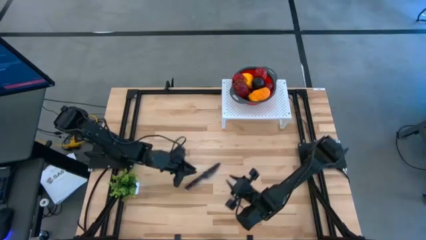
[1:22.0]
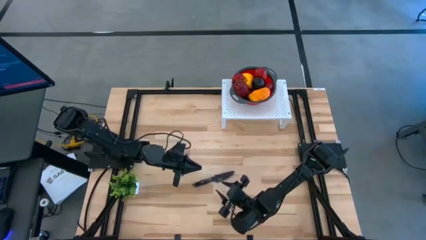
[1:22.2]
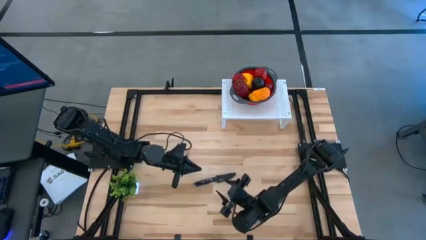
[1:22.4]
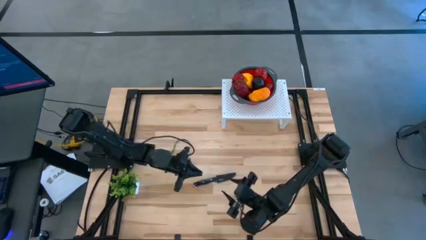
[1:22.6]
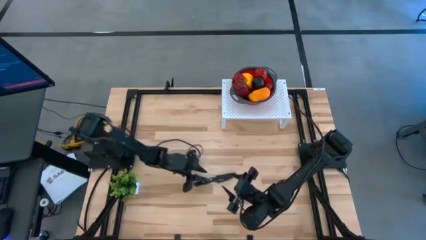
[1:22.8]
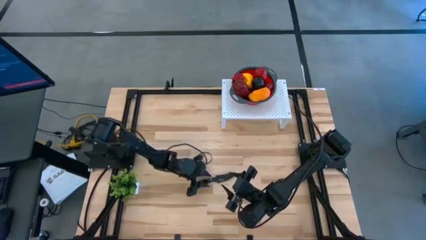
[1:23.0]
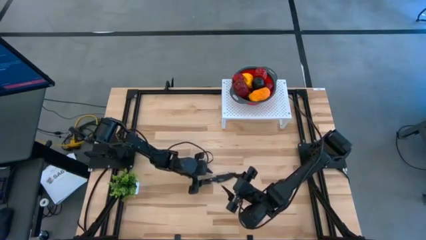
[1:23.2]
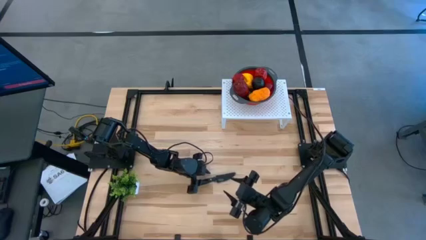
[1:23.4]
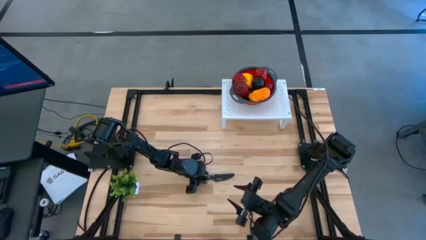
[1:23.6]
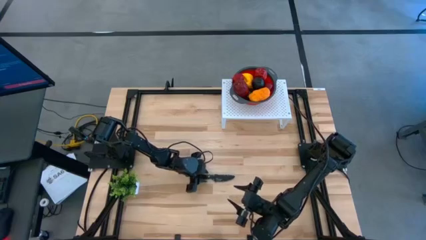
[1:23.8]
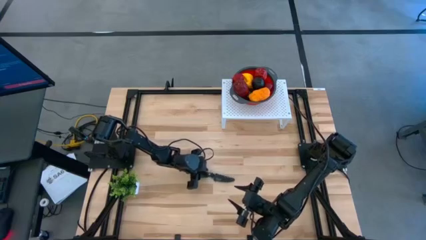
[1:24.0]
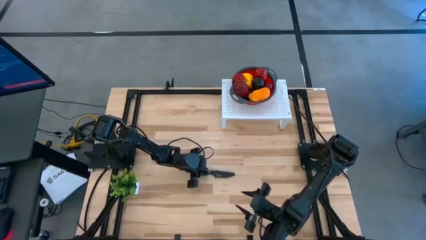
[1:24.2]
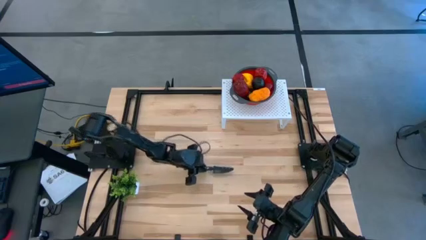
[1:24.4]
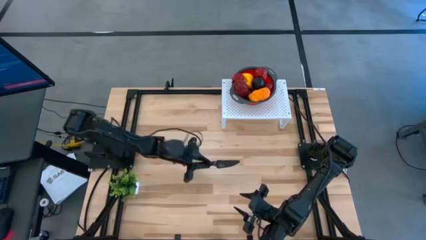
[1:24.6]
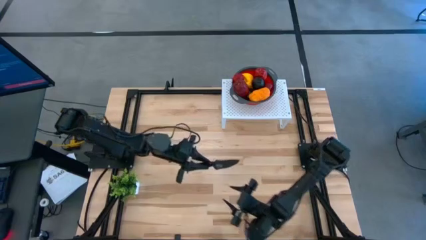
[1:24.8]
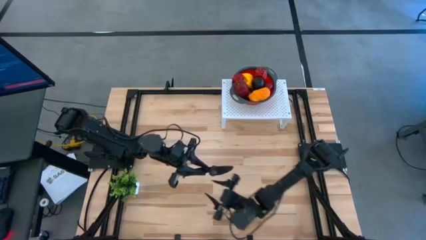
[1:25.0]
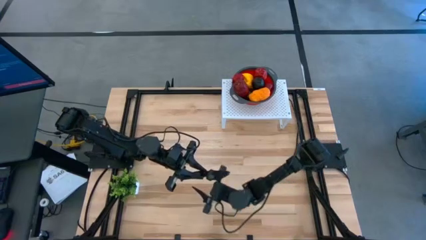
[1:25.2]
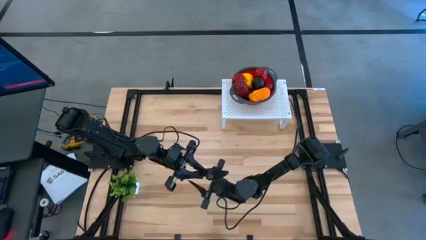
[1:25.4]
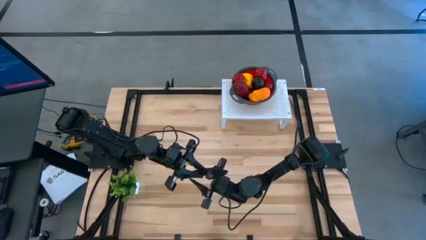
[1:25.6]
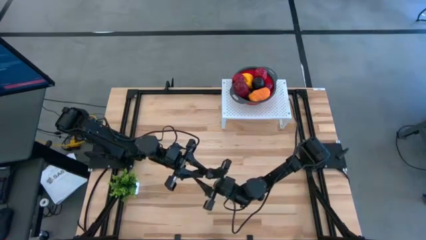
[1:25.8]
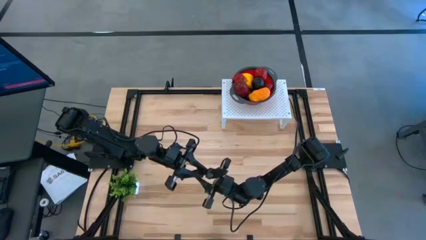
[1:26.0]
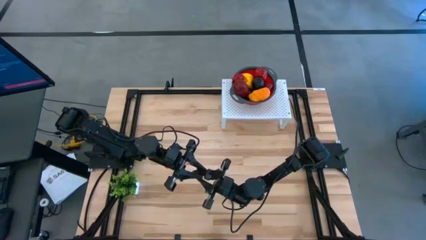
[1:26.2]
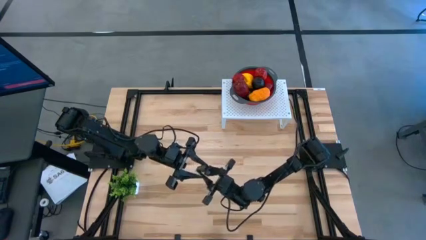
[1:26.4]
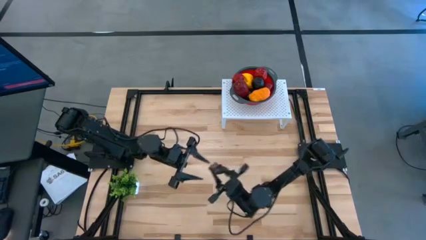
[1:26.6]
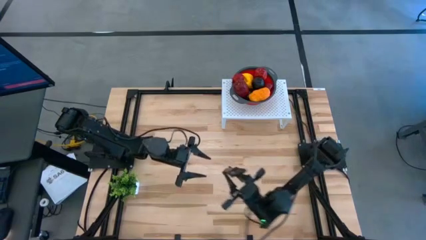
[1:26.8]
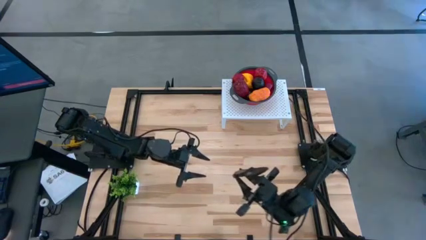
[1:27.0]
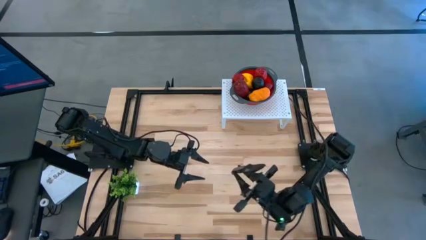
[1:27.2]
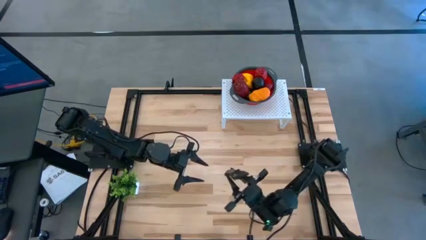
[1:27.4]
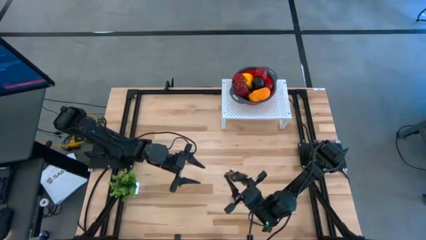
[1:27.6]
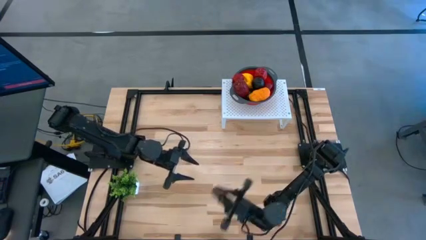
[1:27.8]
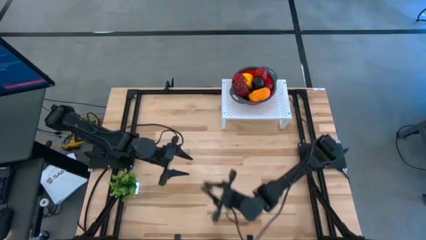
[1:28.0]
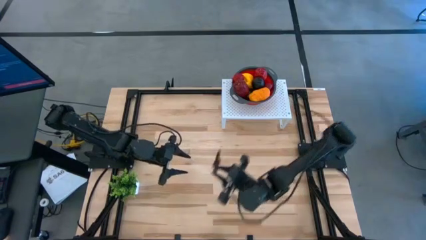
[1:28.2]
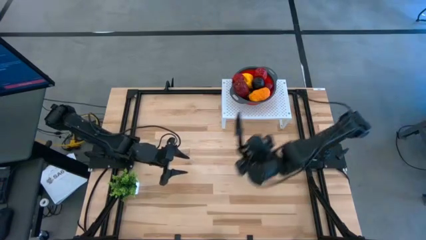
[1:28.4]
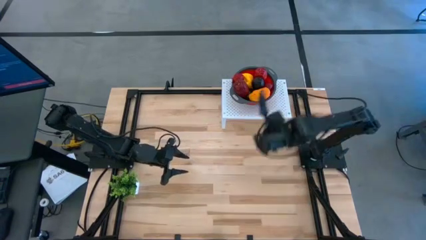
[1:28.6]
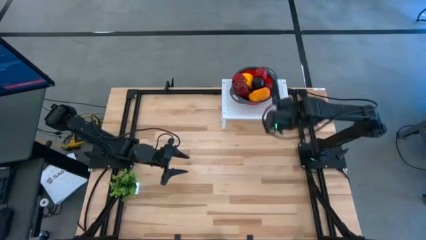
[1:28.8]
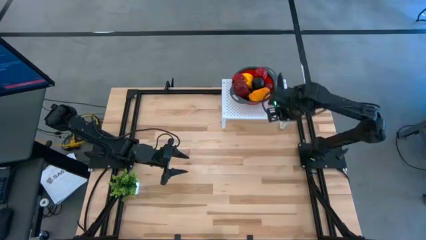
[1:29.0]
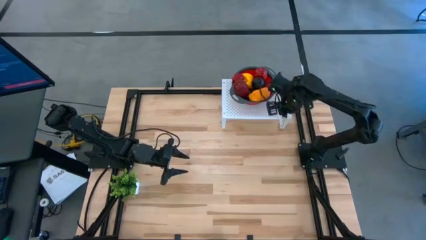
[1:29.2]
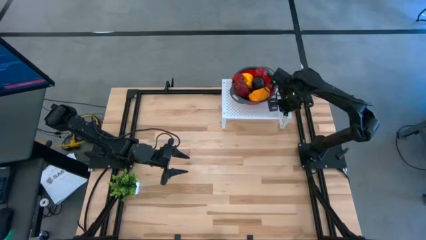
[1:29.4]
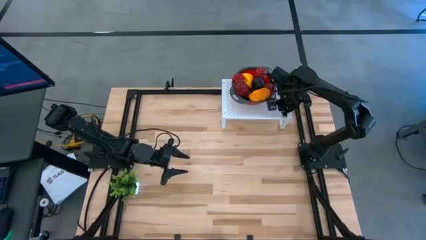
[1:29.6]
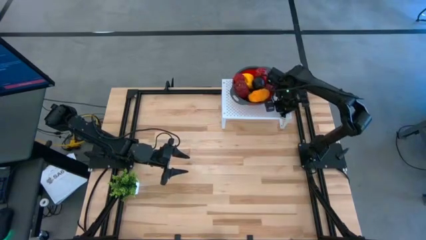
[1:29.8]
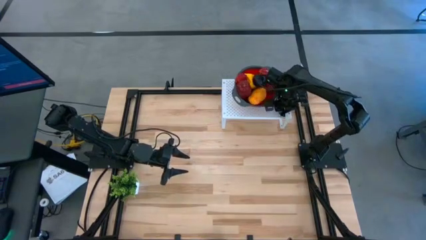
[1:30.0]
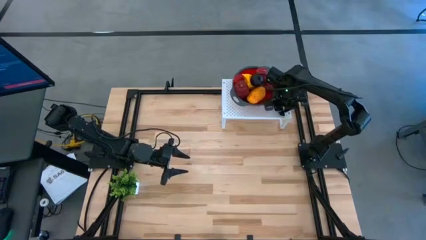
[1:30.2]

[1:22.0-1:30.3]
Task: Pick & Place Fruit
Put the black knife on the shelf

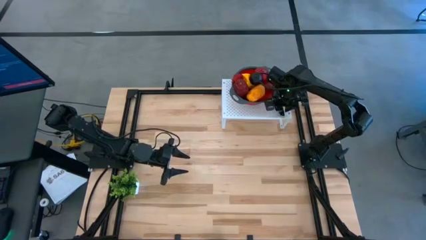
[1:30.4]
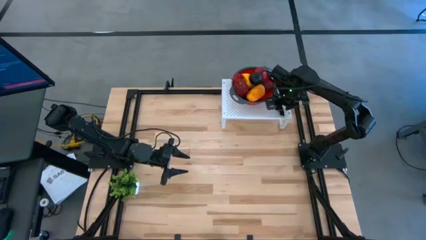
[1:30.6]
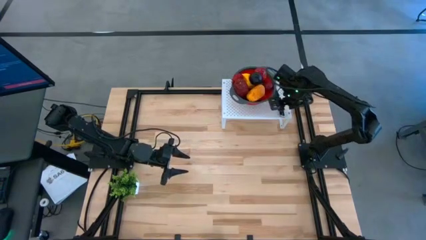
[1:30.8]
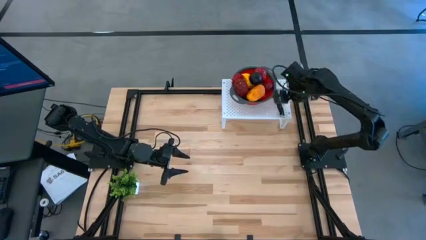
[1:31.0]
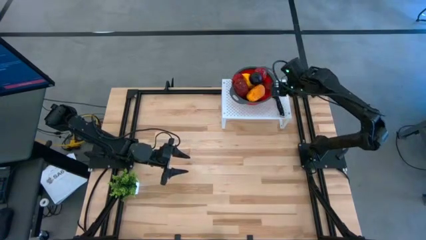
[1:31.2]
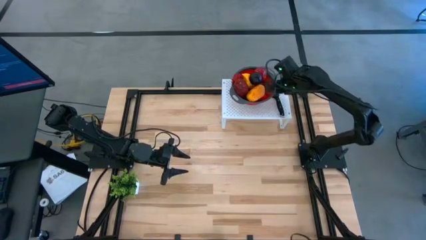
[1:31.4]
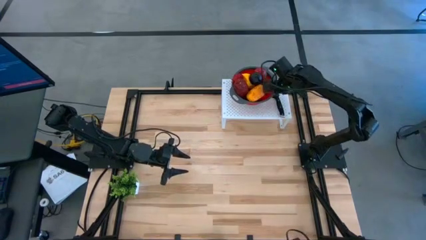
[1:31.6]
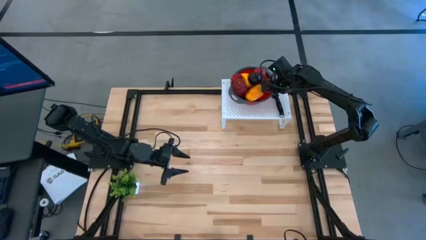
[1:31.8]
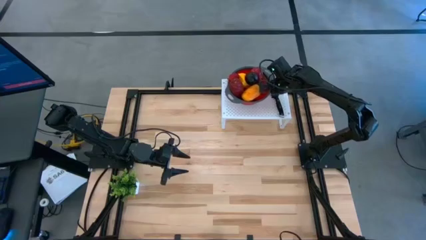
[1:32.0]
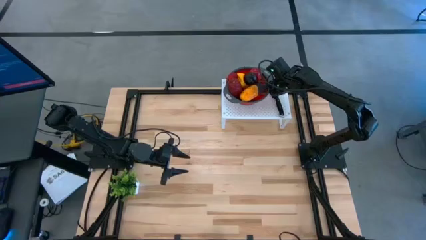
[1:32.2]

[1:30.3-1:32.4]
Adjust the orange strainer bowl on the shelf

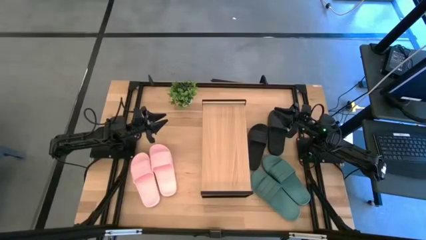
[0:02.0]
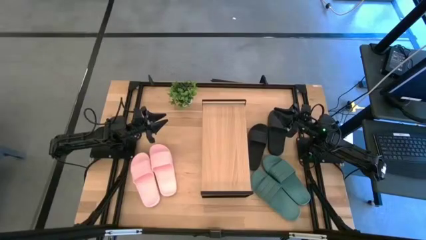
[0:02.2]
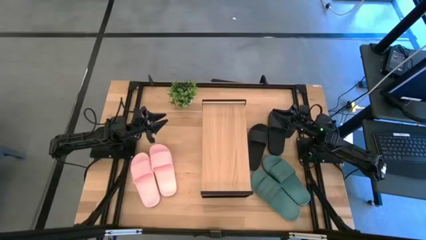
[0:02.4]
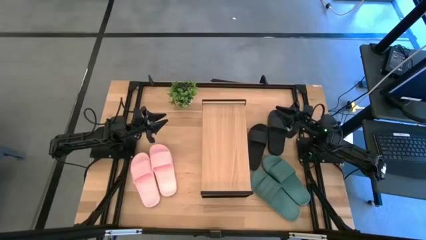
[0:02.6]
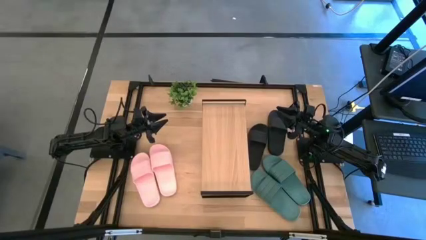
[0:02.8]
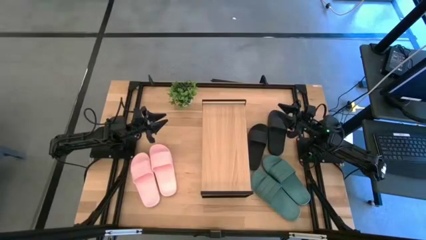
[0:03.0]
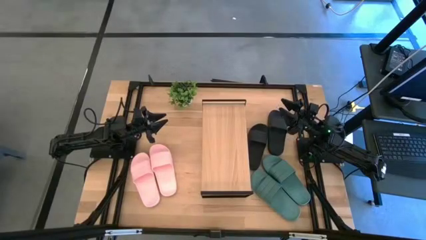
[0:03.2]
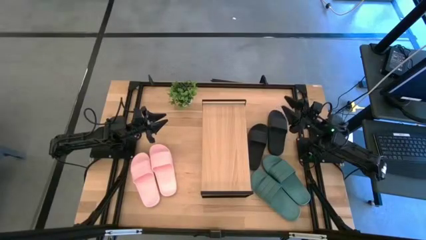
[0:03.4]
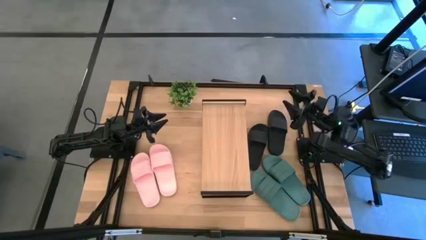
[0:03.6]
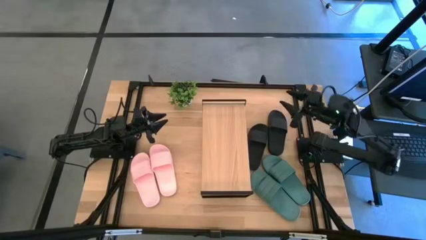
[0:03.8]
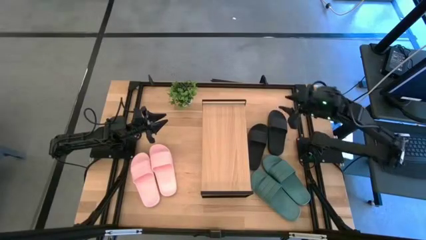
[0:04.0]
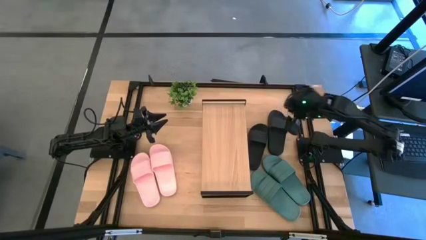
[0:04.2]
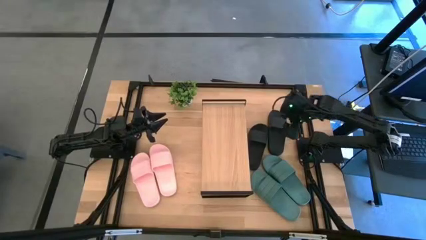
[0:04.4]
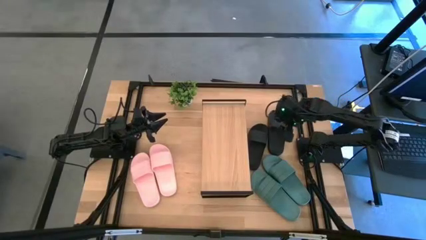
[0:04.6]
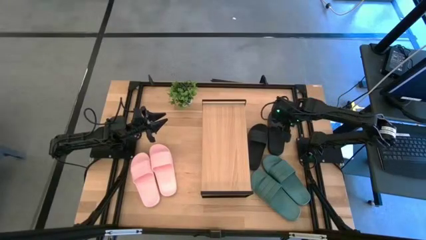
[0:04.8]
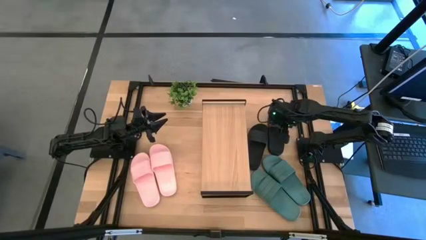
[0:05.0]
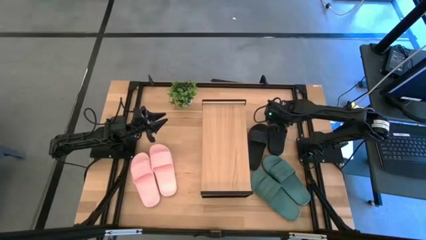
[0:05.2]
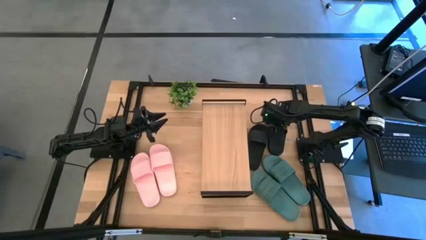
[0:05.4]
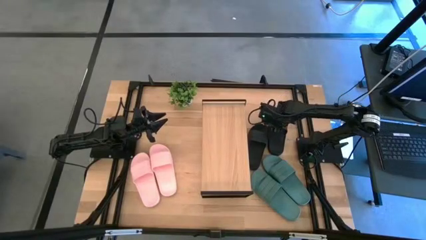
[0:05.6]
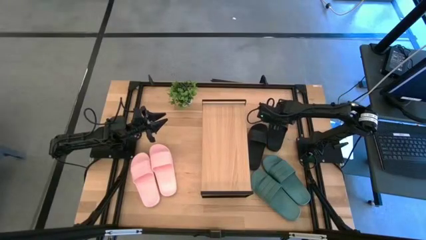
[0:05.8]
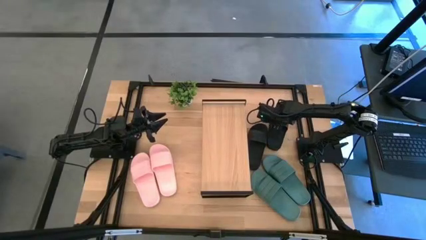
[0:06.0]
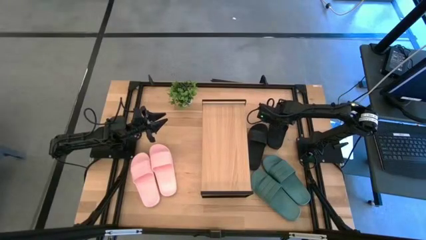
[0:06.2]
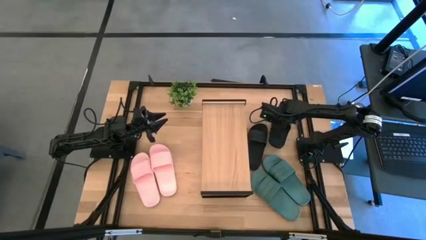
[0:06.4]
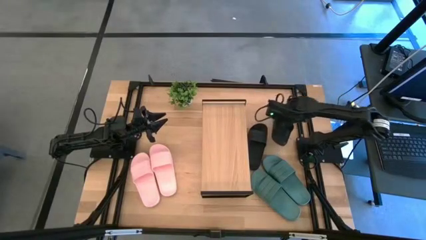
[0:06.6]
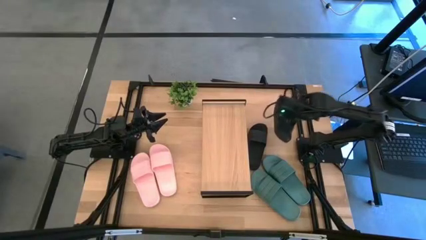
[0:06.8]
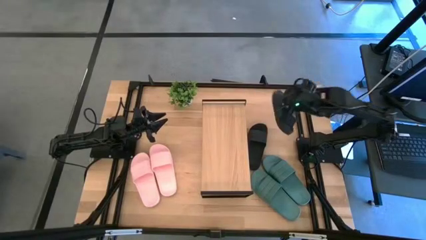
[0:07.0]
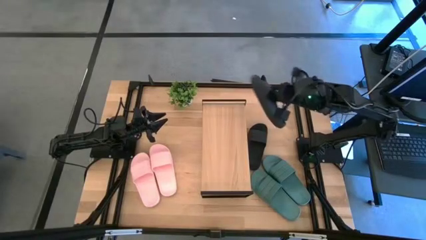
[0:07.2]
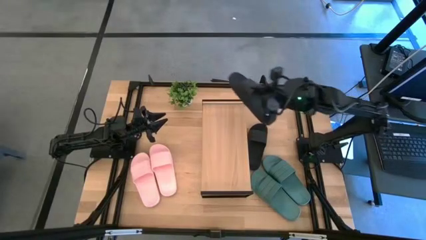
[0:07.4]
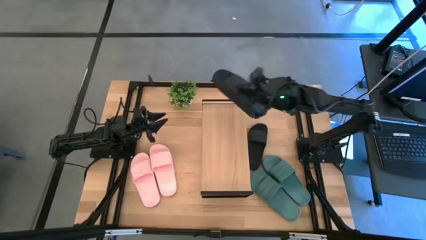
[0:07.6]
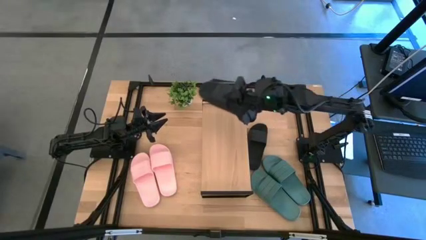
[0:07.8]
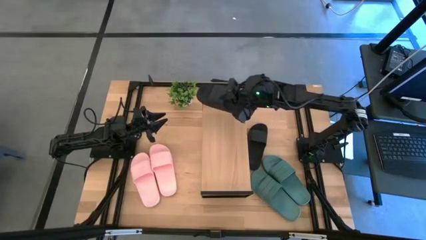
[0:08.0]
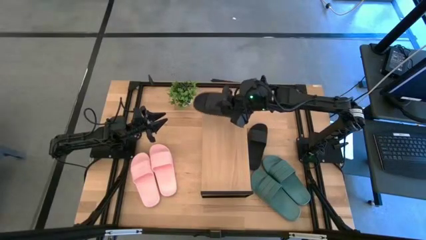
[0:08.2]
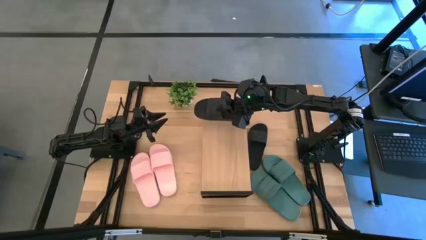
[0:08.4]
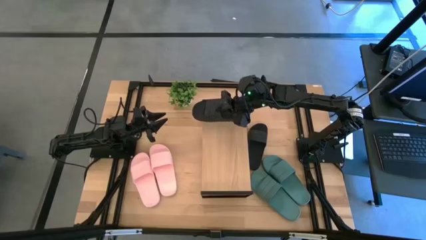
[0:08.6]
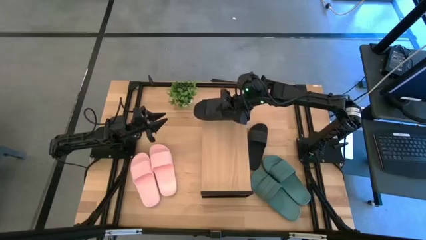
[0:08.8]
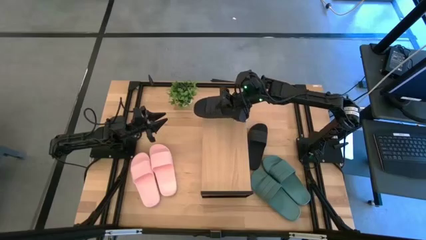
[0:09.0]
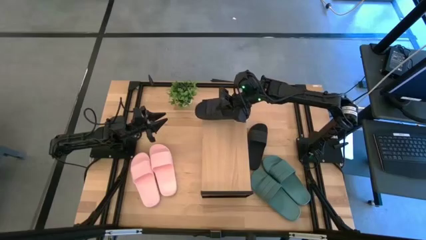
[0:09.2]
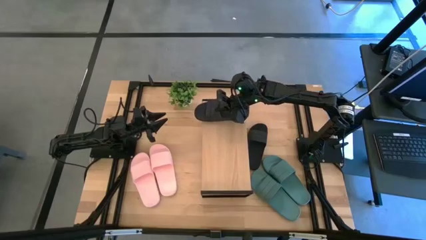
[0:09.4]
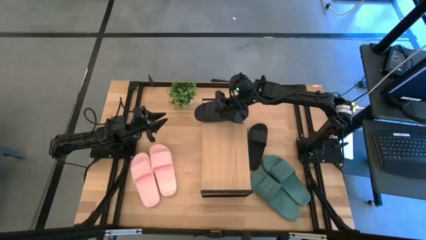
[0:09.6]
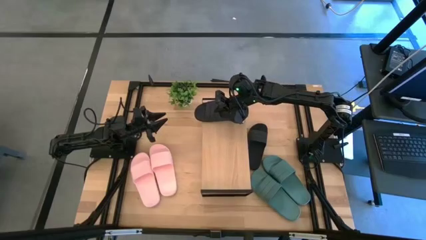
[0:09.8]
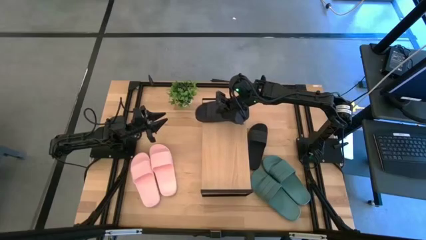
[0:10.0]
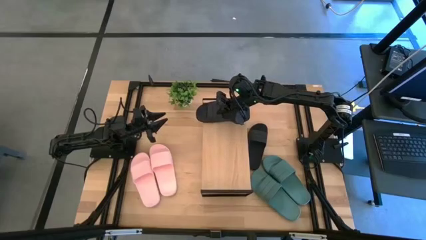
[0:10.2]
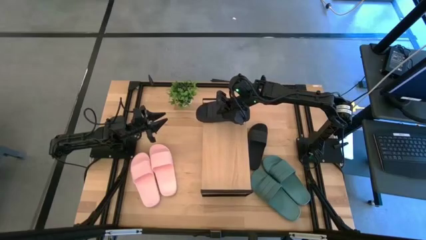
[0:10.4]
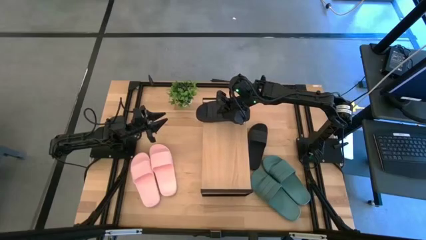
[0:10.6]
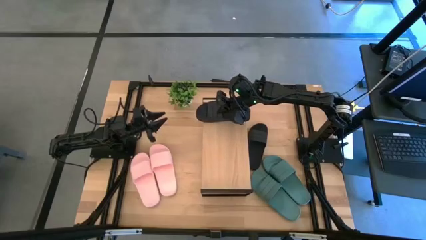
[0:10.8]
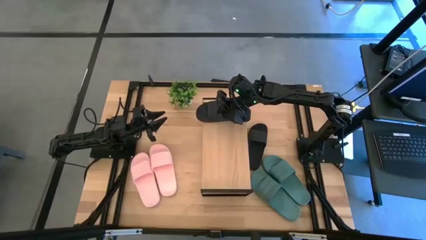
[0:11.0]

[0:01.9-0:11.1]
Task: Pick and place slides into the shelf
Put the right black slide on the shelf
